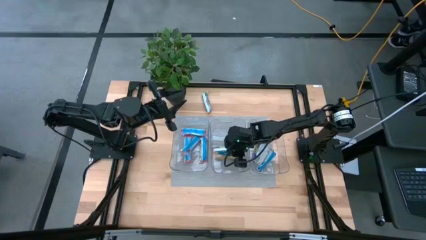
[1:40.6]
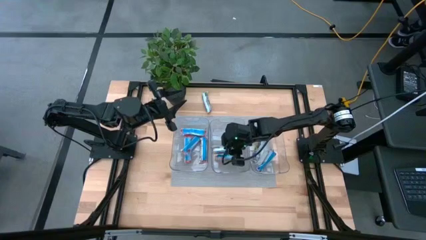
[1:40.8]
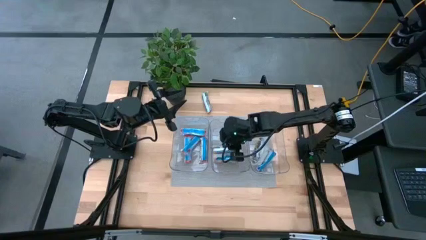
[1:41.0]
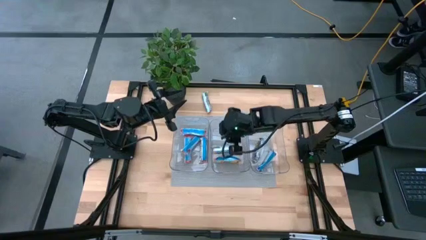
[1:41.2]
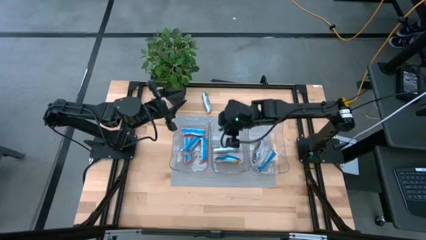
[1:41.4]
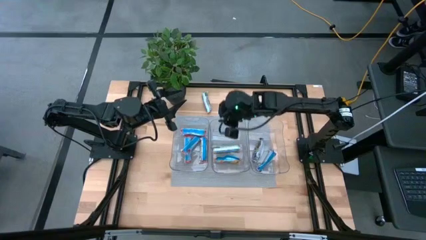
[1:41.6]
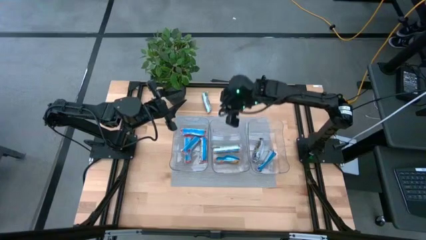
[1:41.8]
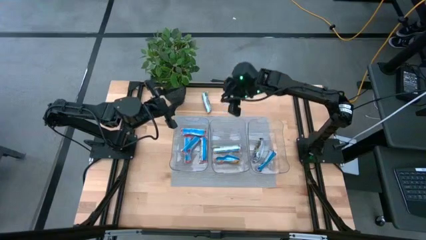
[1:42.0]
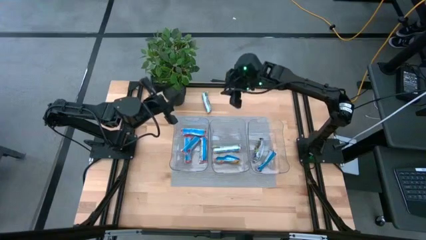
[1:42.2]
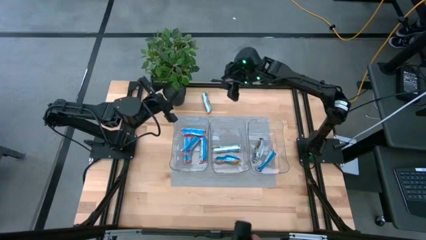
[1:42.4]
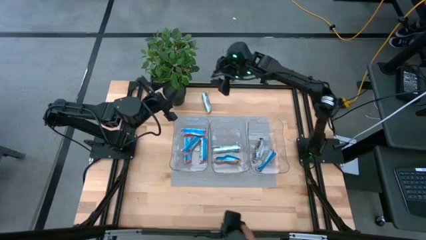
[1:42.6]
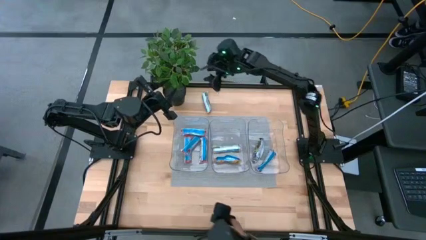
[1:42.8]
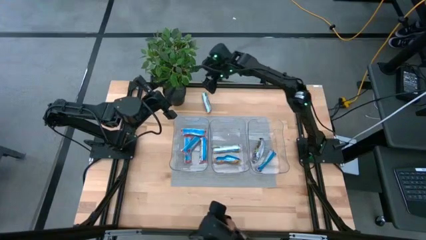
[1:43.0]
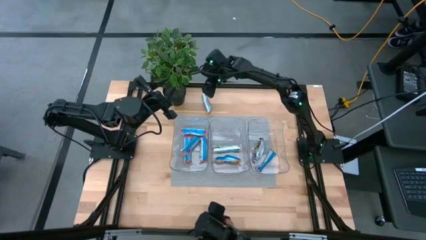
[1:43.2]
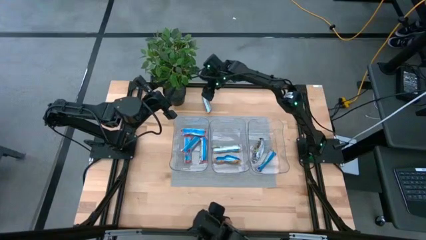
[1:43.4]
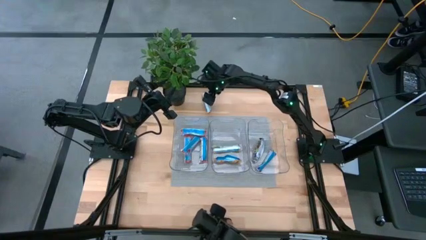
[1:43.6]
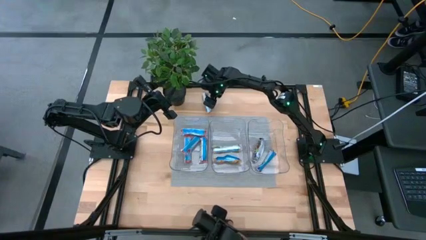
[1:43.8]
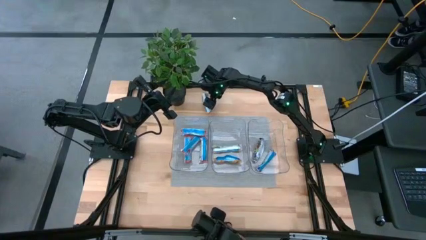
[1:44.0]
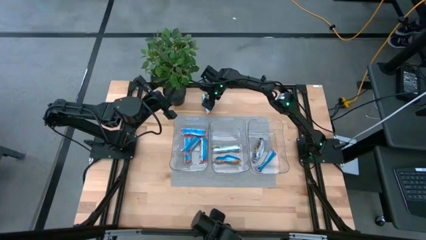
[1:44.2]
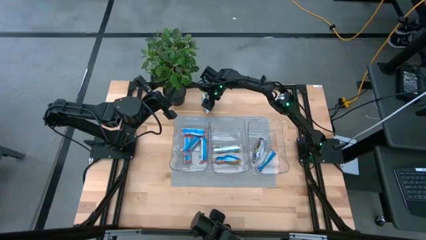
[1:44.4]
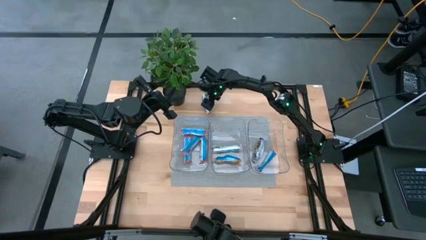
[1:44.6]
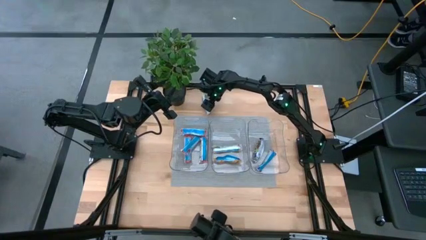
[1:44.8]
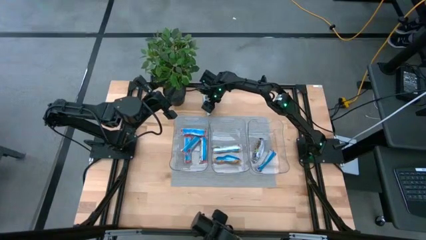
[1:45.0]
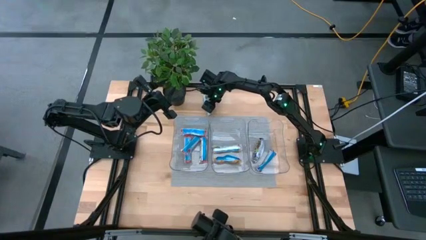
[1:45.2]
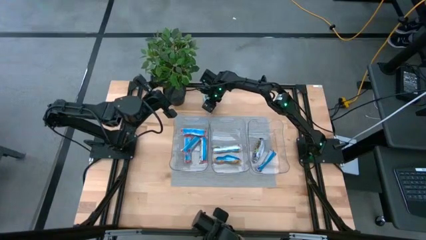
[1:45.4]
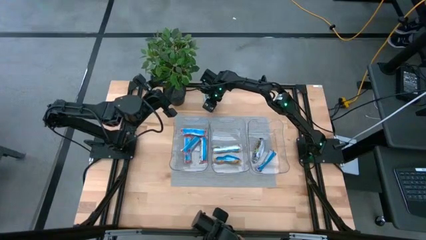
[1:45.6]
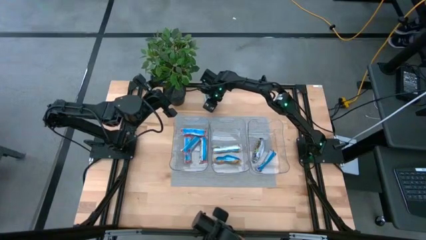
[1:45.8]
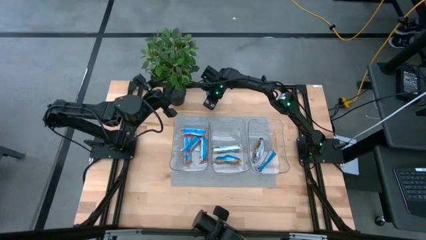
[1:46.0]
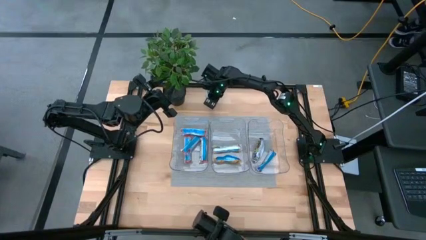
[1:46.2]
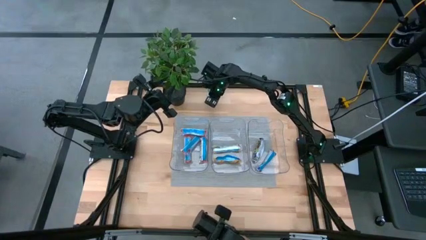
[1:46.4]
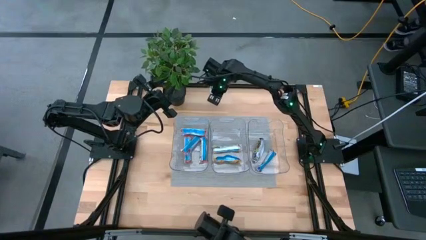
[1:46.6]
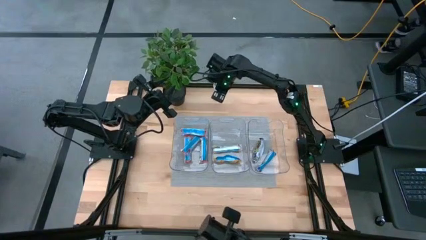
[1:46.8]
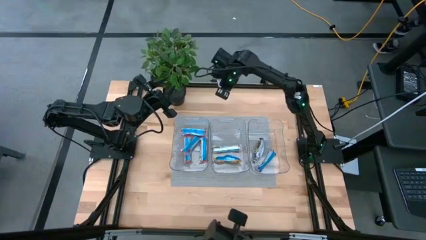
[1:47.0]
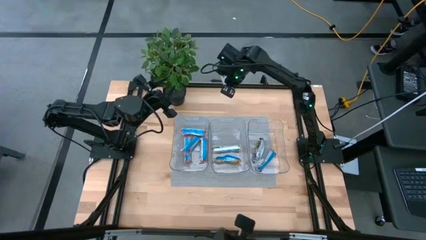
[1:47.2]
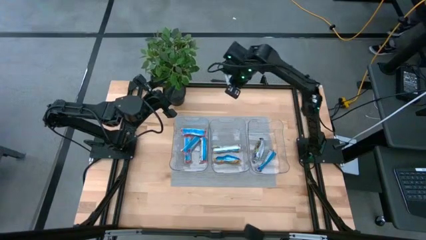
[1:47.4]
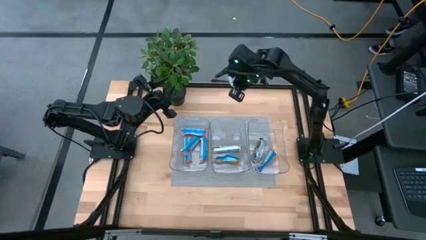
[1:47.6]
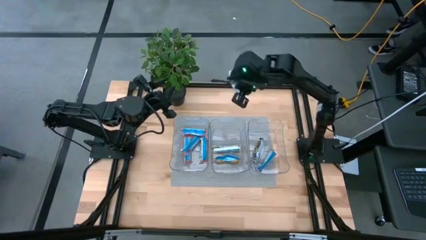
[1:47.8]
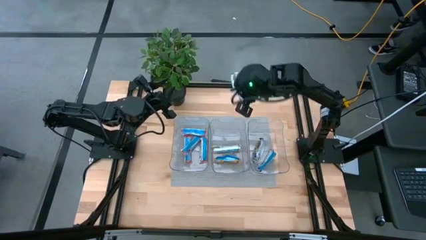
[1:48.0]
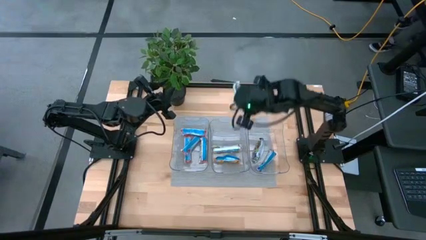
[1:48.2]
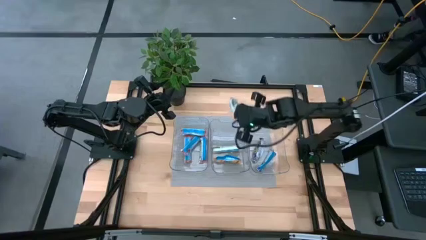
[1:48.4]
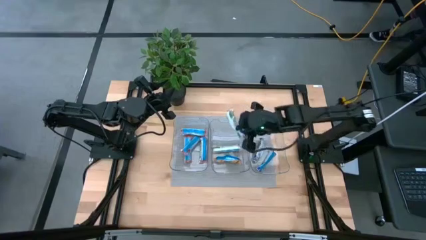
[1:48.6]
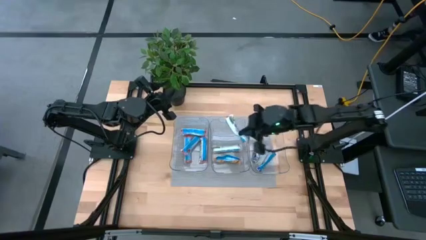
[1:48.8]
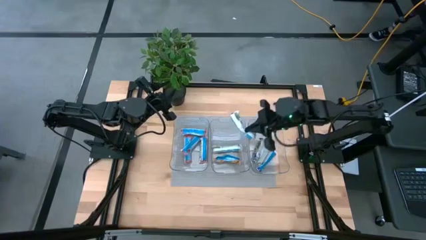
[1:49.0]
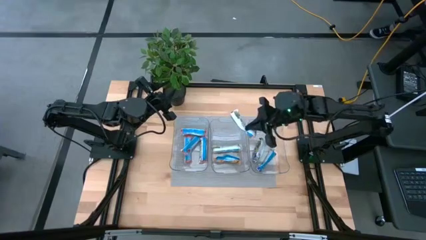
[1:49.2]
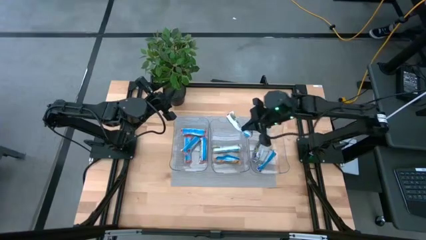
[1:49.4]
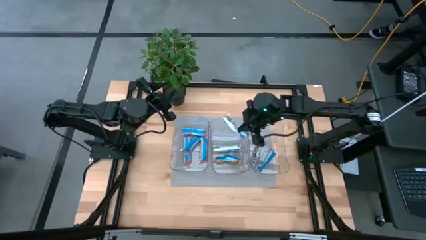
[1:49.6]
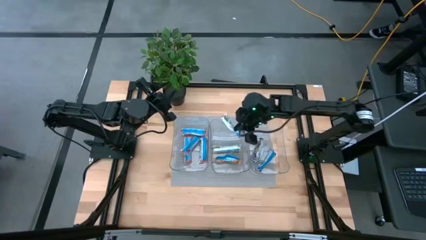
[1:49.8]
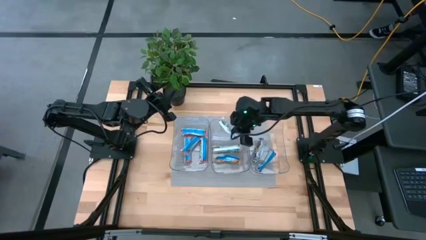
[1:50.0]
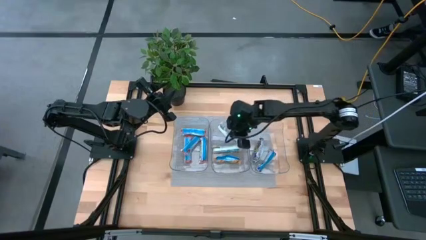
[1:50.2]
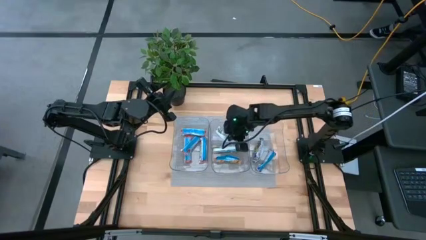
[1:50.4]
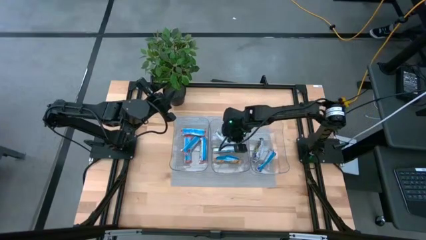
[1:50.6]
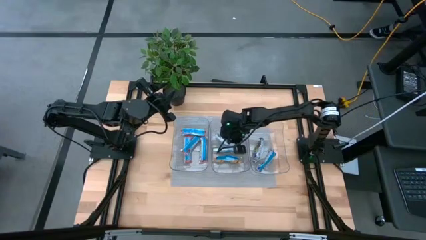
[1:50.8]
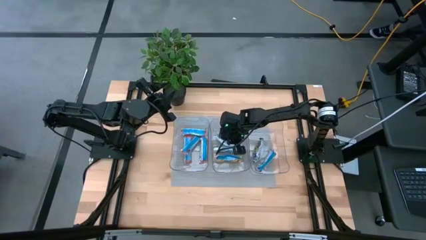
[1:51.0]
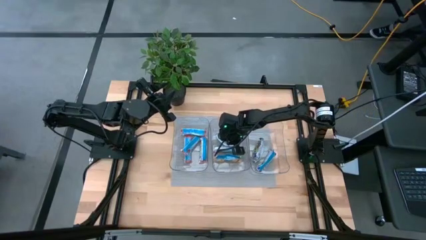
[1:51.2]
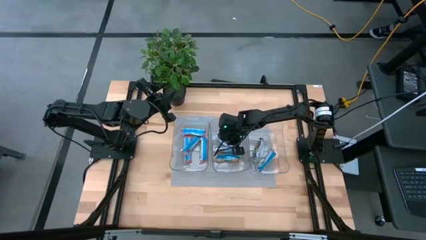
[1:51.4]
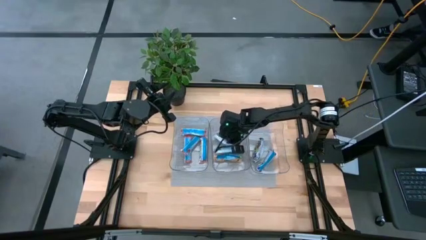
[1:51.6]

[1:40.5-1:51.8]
Task: Pick and place Granola Bars by type
Put the yellow granola bar into the middle transparent bin

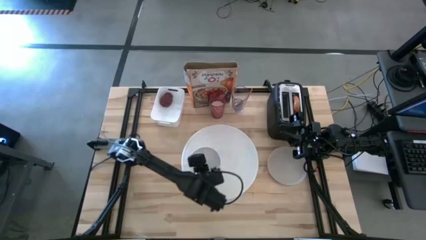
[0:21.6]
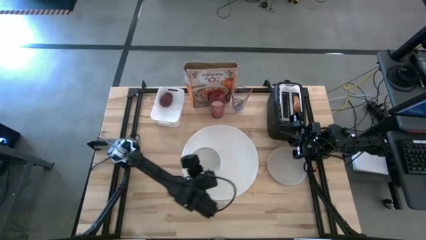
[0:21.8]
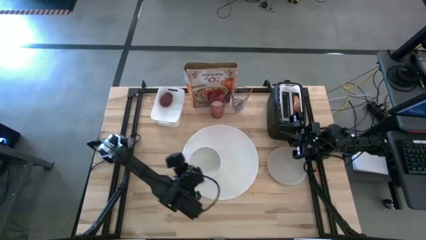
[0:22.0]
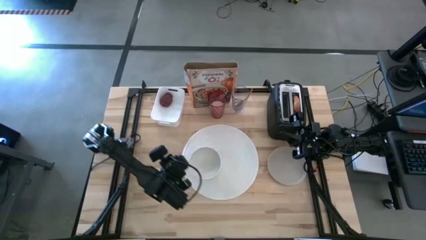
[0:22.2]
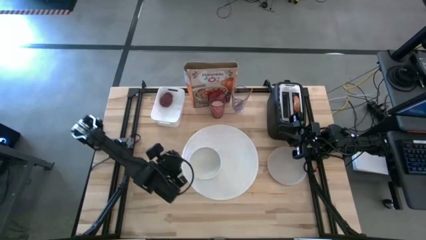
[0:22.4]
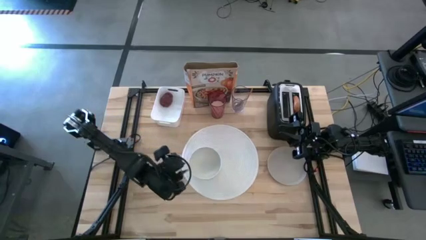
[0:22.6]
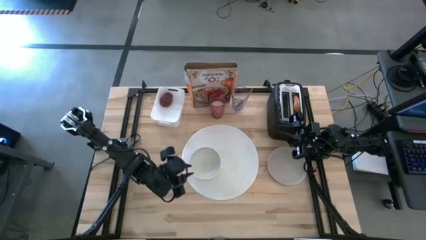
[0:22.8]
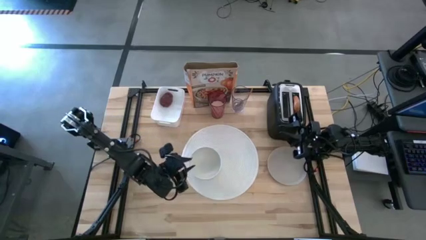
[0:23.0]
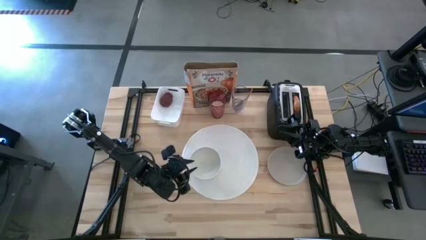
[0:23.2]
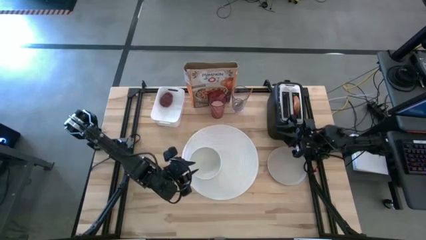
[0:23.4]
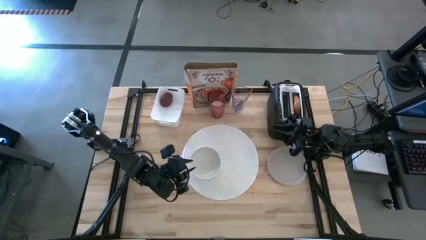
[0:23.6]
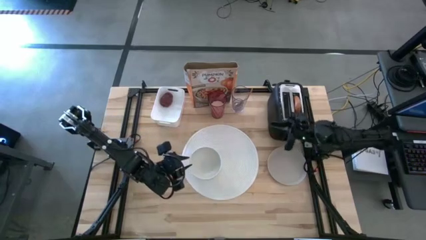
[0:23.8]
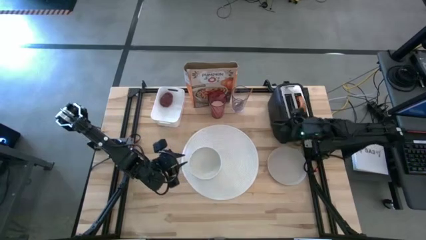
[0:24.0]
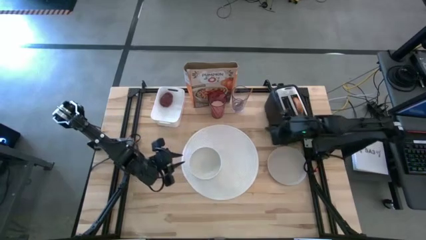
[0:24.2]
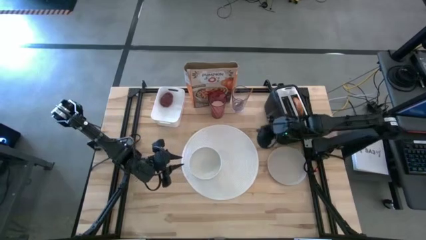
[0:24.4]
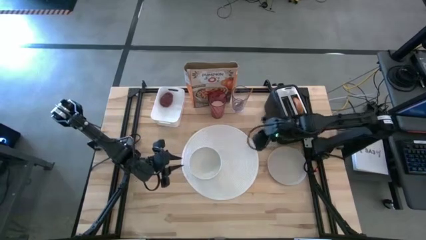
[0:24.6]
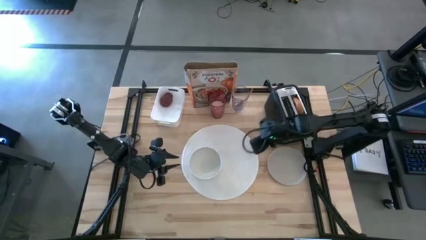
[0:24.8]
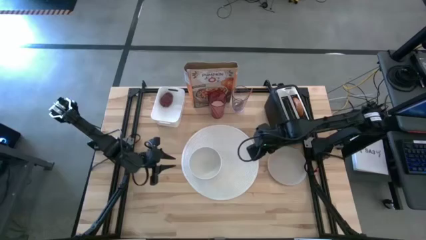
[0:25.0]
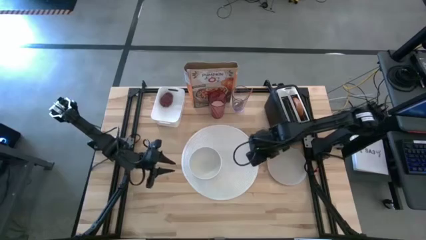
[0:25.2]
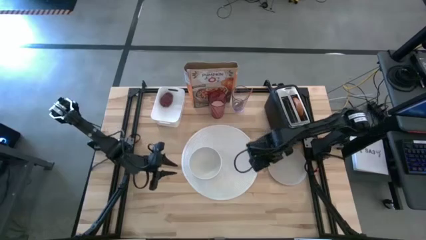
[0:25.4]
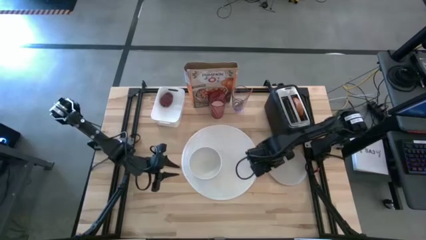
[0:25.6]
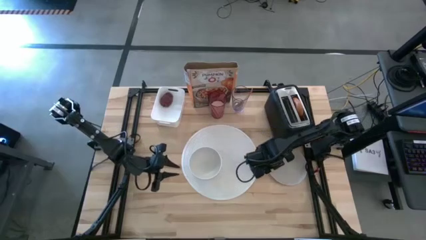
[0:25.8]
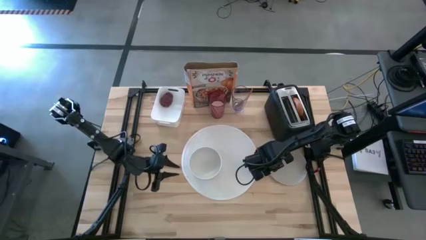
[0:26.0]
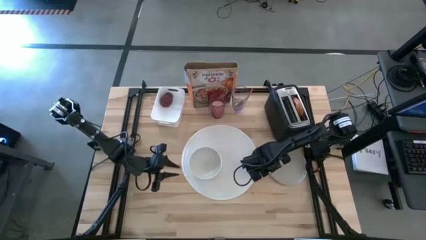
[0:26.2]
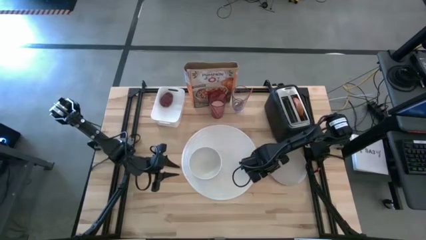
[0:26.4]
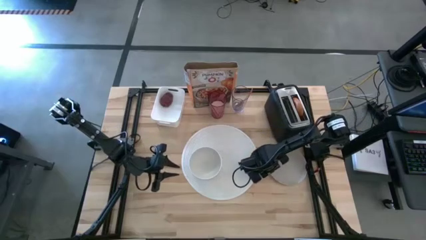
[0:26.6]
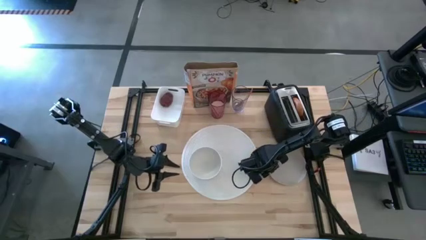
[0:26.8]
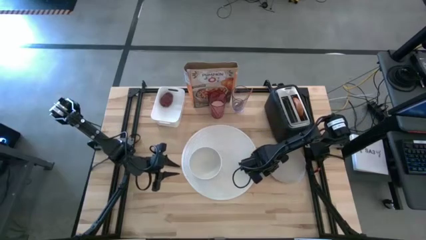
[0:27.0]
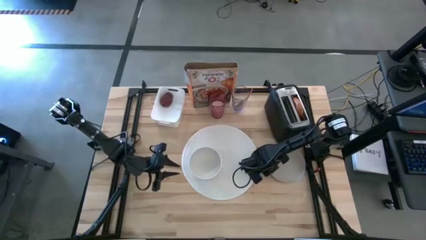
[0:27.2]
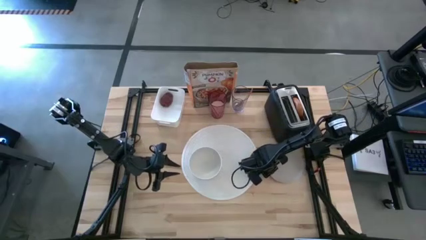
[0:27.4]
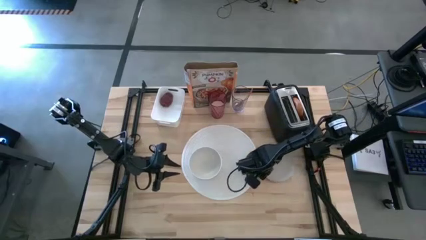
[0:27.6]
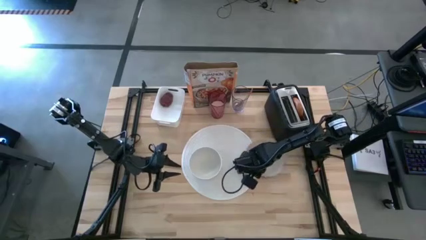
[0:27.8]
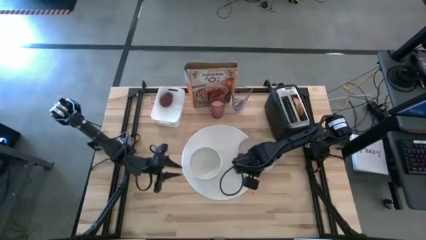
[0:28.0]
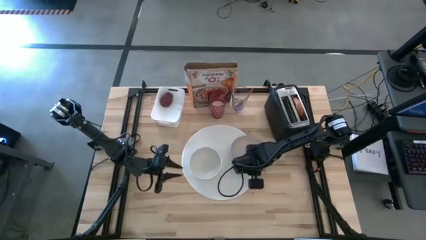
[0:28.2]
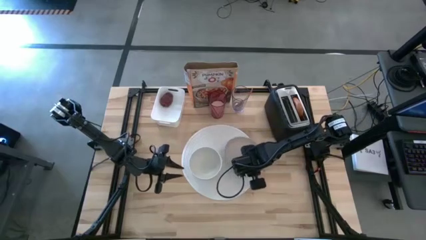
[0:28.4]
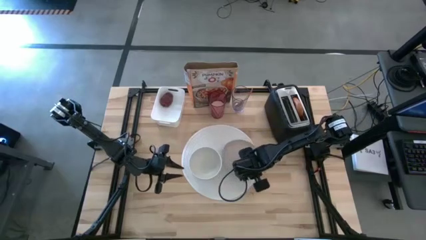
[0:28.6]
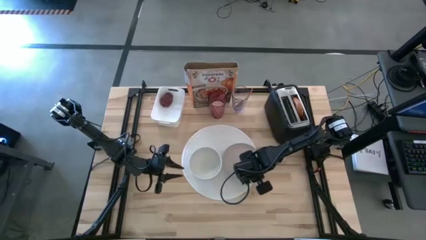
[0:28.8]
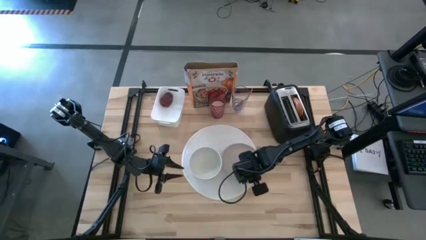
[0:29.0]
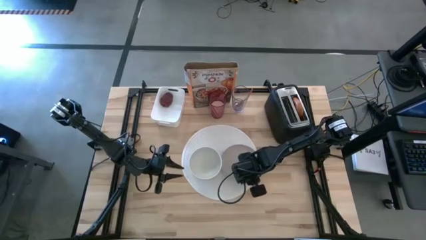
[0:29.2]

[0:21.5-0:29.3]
Task: Arrange a breakfast setting
Put the white and gray plate on the white placemat to the right of the white bowl
